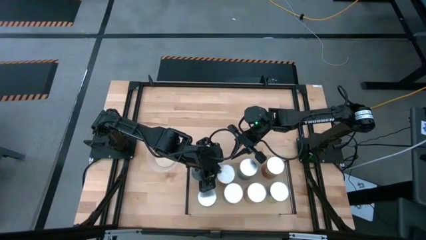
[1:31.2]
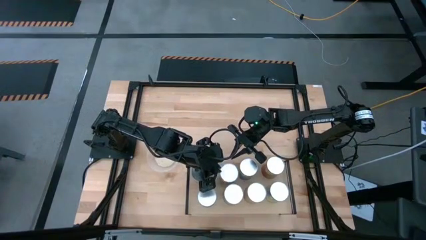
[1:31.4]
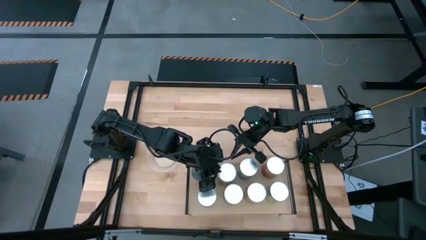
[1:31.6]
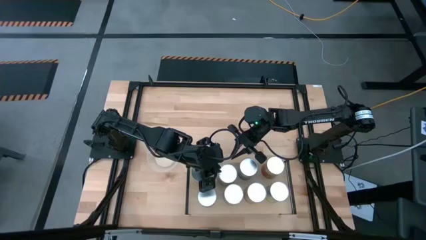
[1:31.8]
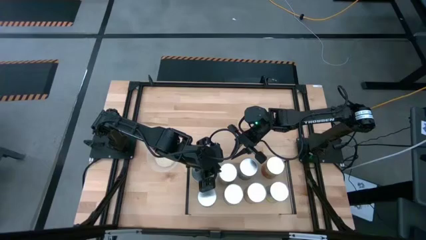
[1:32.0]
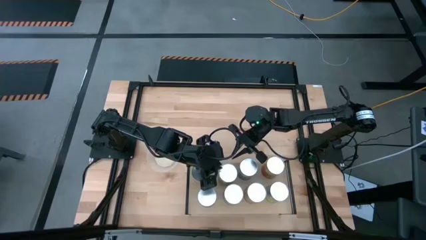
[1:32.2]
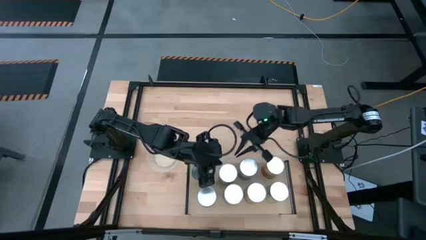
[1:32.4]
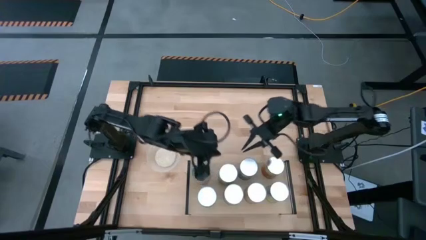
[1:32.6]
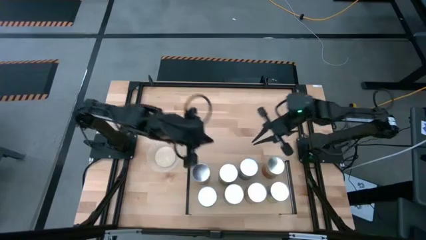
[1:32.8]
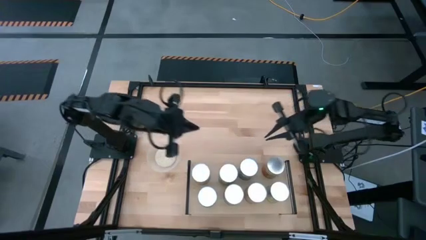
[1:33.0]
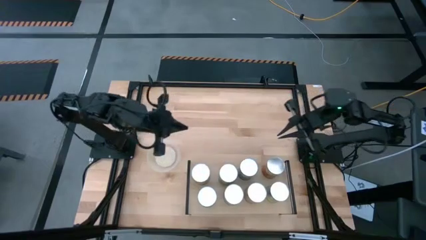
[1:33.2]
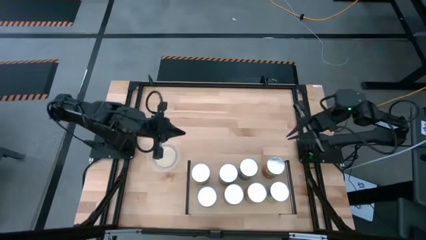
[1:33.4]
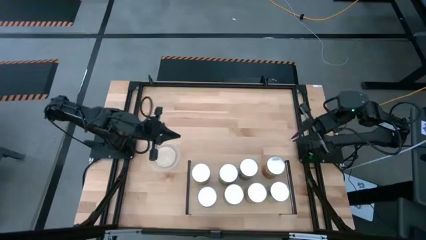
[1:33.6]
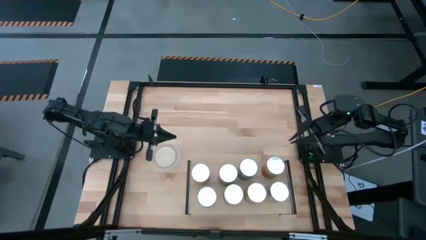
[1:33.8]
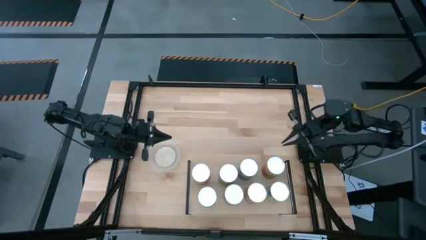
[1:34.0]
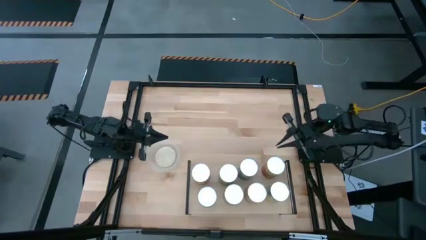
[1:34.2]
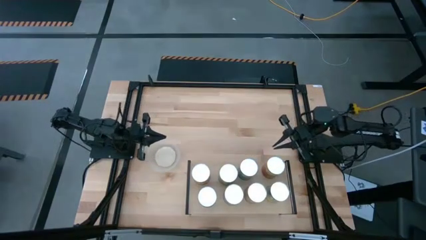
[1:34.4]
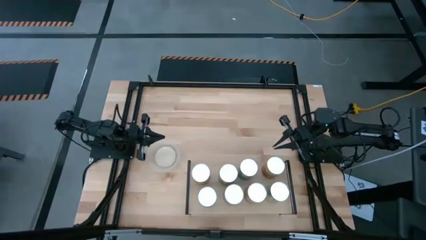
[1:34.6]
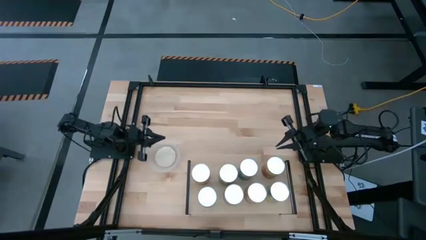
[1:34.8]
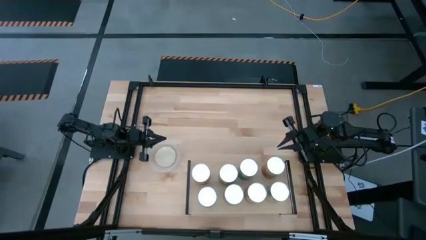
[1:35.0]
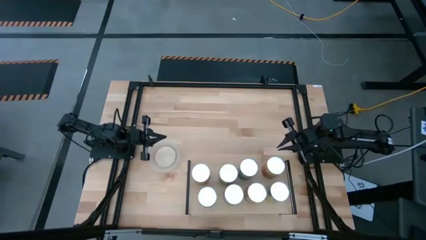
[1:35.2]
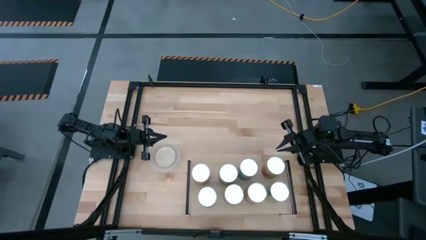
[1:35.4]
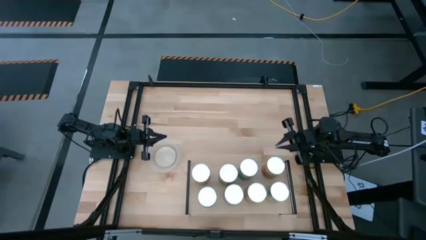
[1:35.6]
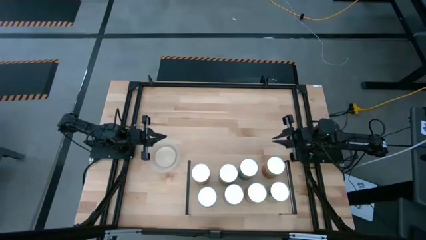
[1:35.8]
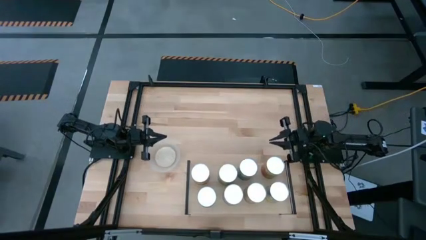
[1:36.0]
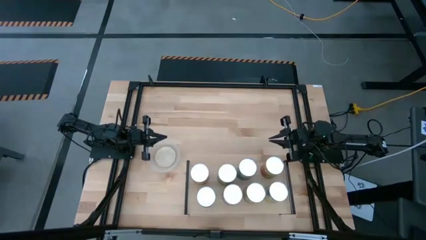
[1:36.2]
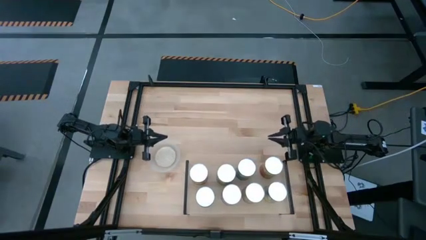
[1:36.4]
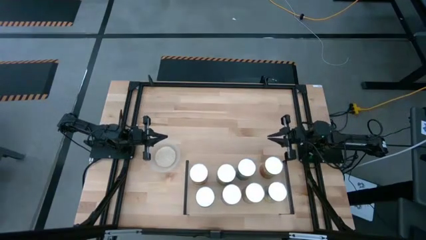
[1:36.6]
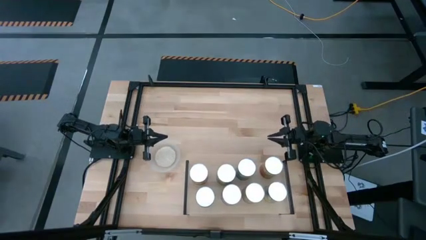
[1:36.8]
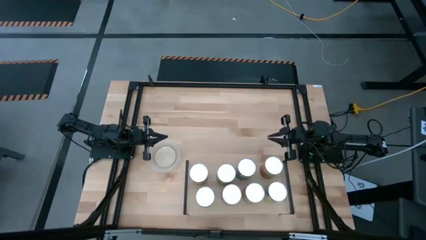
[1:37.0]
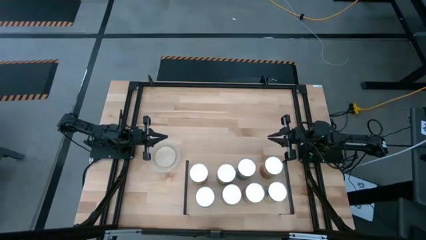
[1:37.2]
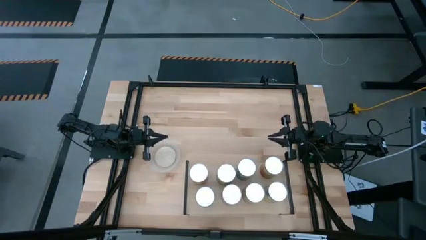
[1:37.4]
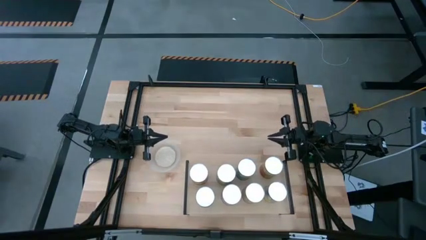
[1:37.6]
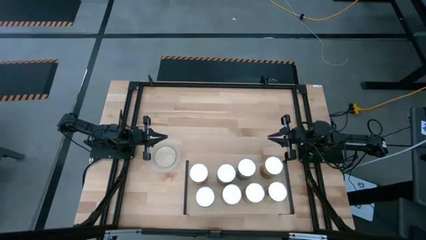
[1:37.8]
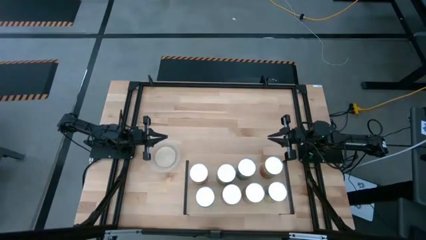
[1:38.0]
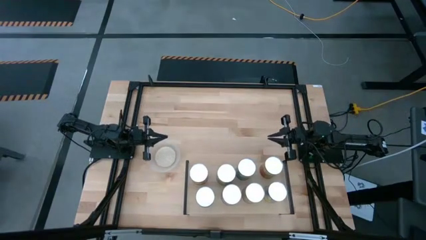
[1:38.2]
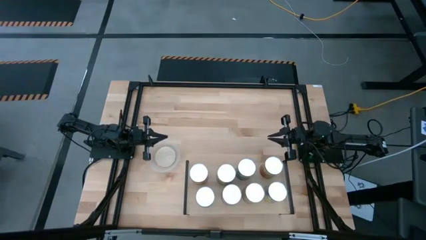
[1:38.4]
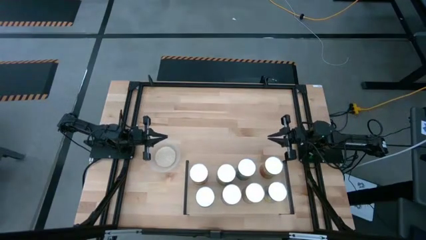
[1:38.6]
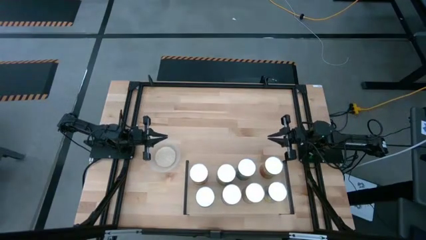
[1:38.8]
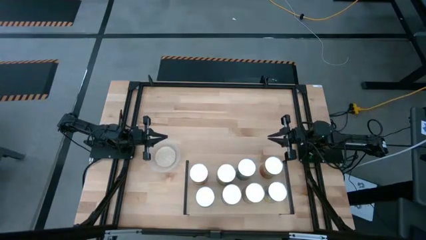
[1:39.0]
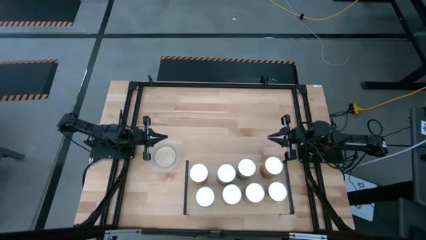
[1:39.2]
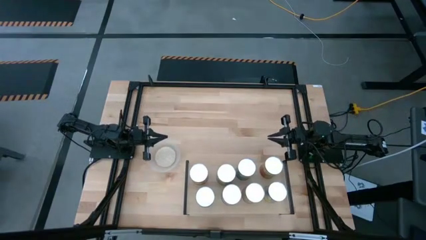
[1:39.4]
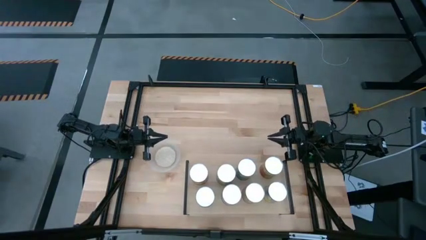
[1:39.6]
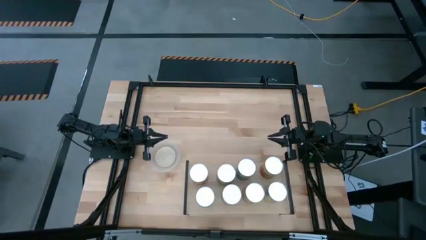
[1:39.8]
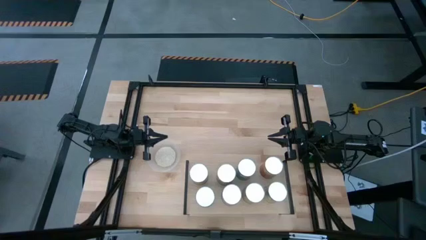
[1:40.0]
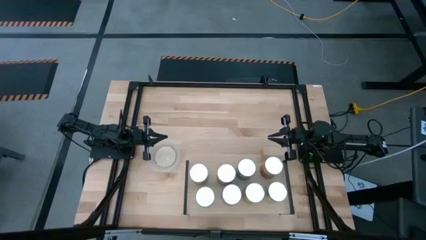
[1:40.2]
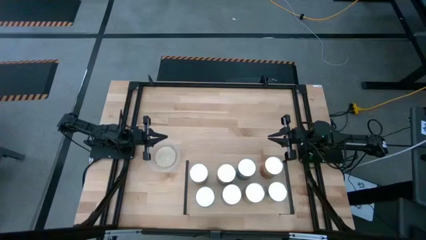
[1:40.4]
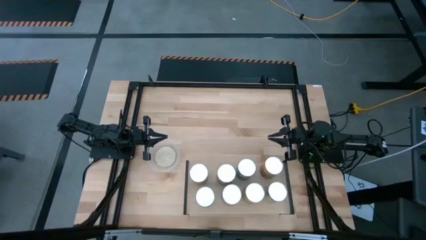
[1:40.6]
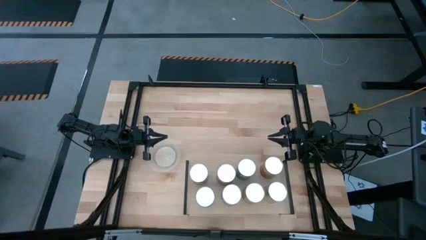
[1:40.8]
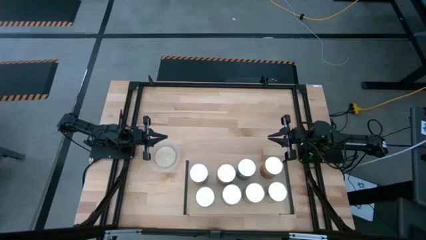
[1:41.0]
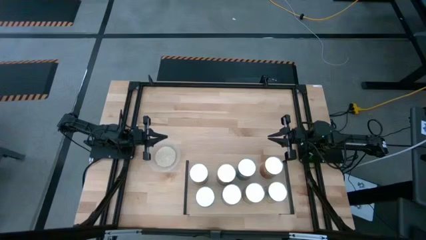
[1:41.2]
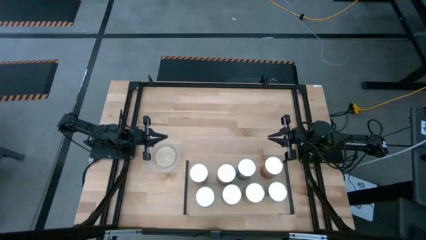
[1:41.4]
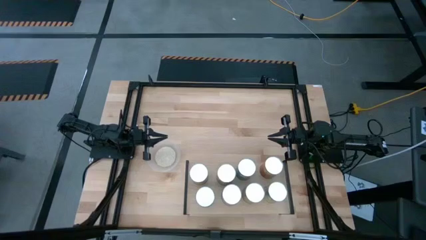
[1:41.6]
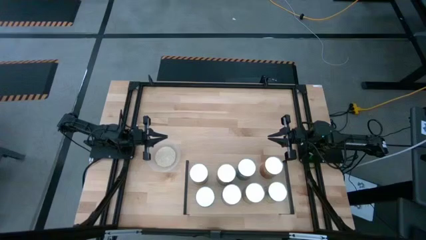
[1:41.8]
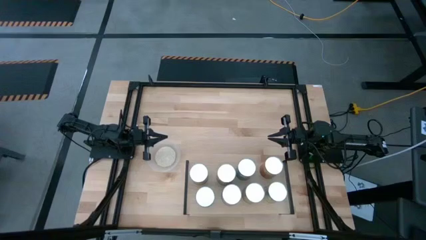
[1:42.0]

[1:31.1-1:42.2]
Task: Pick and place cans onto a shelf
Return to Home Position

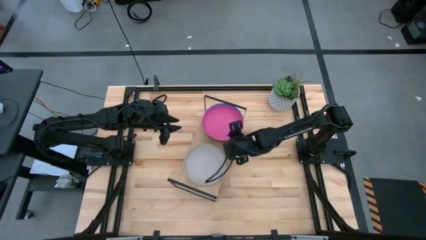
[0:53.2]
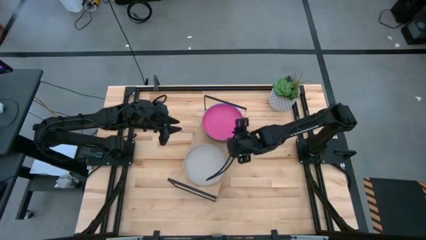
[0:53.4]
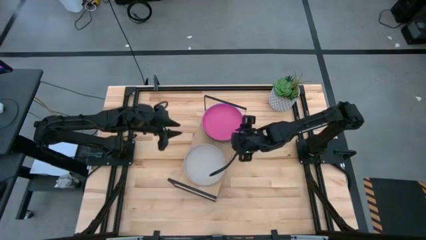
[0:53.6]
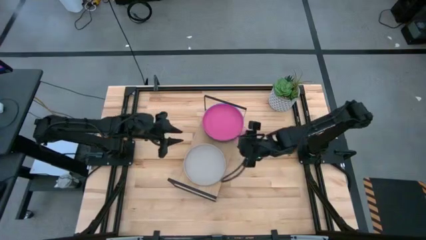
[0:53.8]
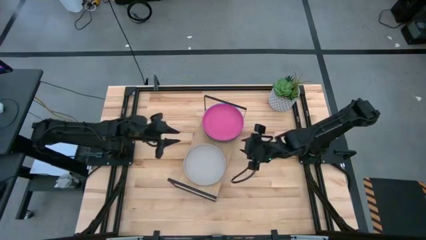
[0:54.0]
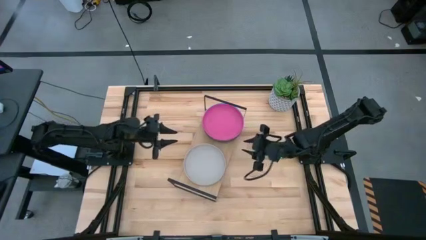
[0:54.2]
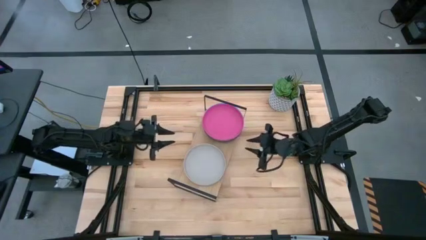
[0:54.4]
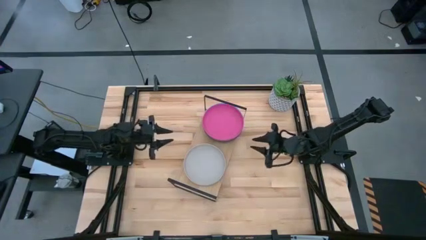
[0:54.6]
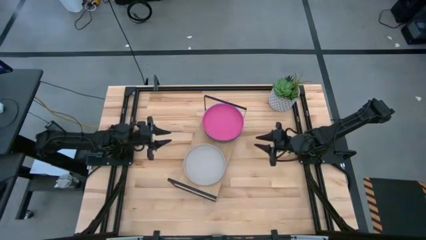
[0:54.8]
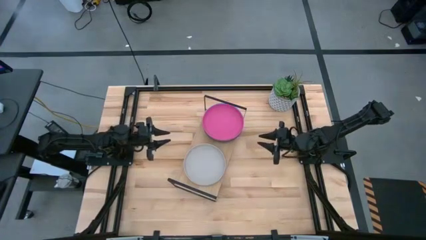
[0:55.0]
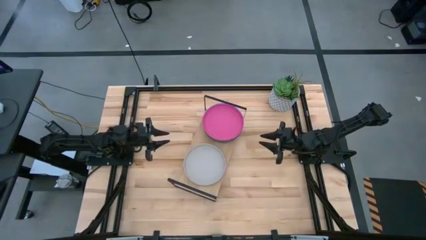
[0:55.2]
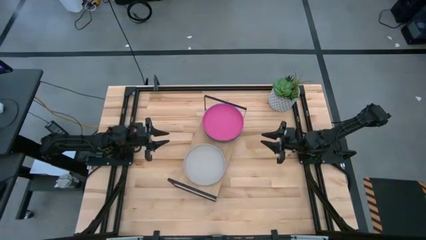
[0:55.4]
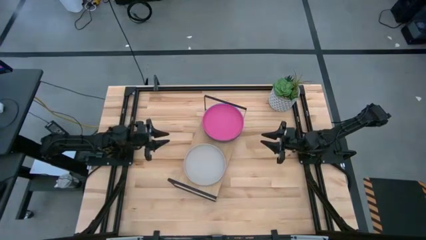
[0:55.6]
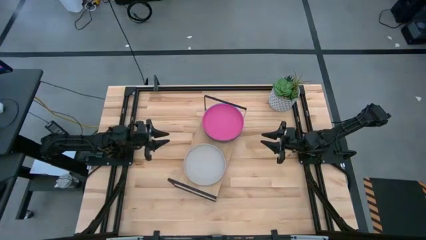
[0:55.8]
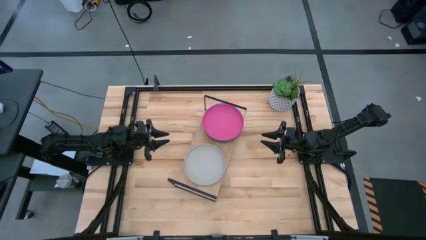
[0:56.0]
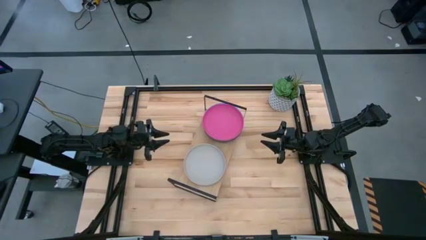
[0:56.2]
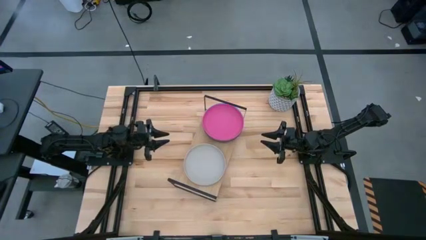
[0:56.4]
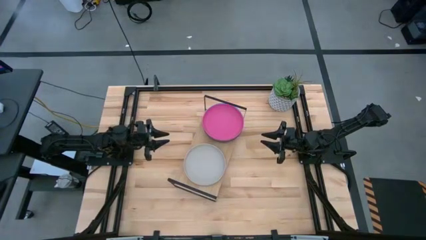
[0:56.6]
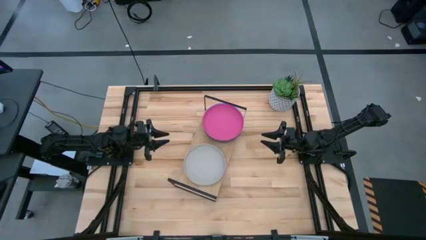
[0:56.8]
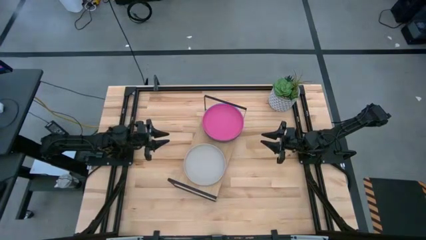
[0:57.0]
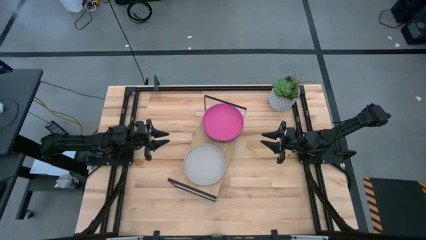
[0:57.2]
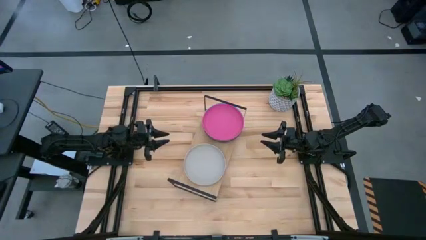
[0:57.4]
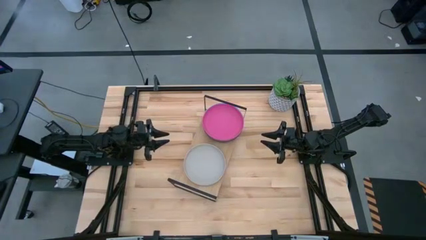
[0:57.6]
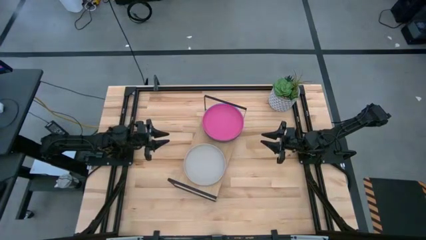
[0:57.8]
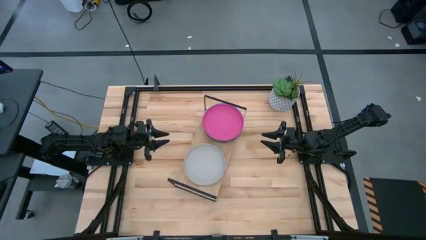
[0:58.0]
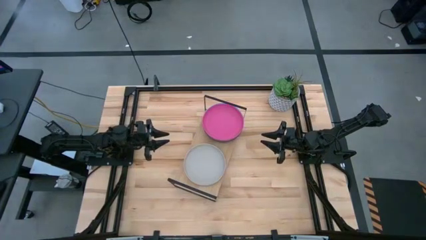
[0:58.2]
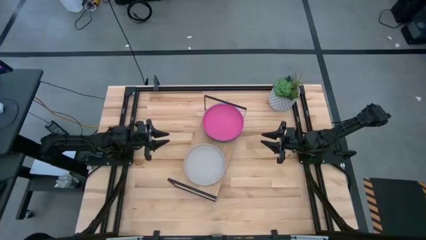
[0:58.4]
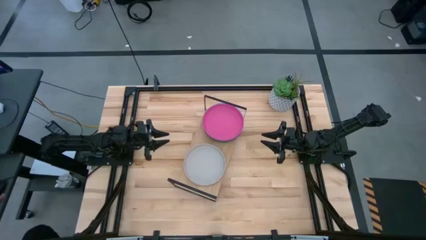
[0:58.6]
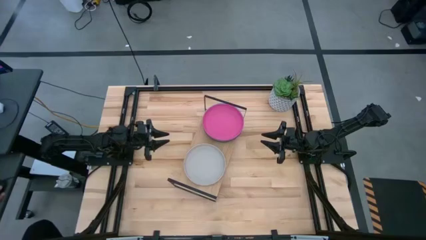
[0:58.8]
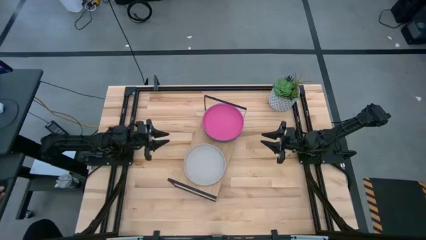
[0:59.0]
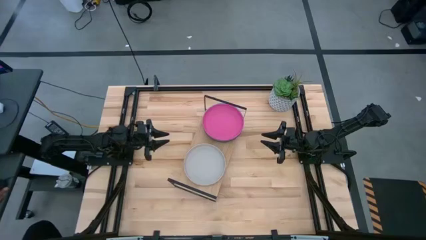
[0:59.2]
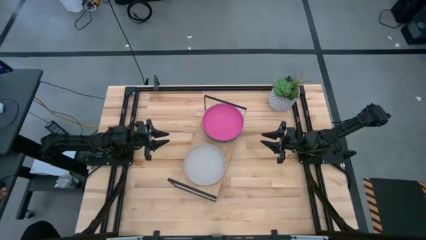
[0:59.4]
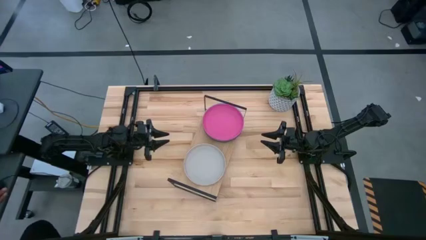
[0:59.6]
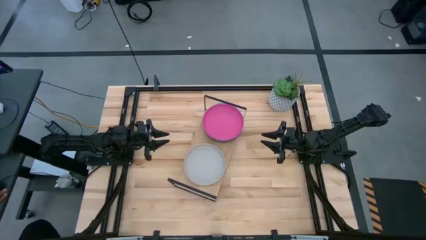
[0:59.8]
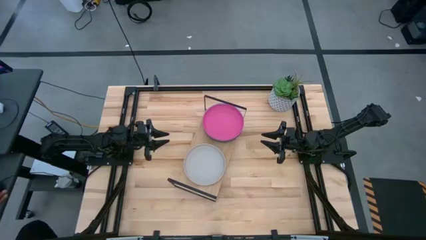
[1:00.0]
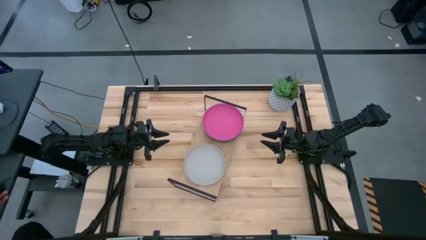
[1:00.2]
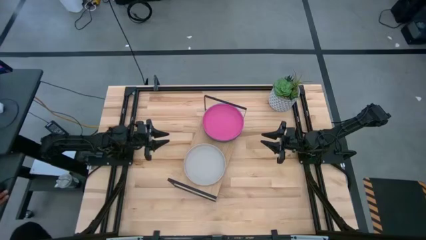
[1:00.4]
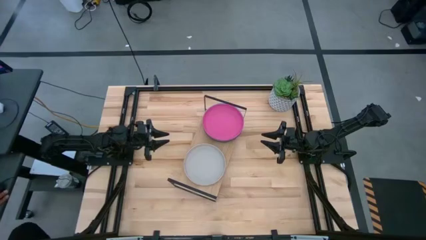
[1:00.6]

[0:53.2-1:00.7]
Task: Place and stack plates onto a shelf
Return to Home Position
